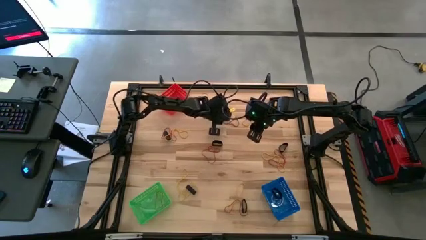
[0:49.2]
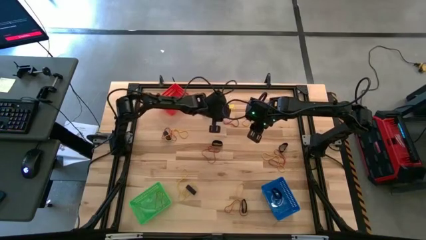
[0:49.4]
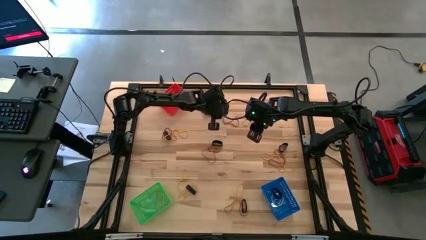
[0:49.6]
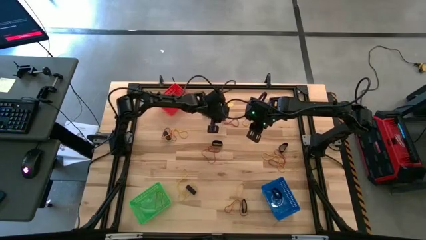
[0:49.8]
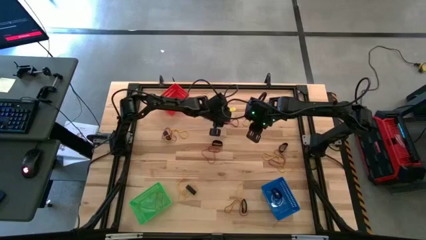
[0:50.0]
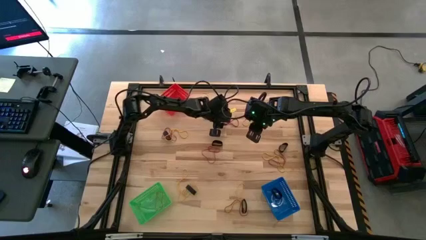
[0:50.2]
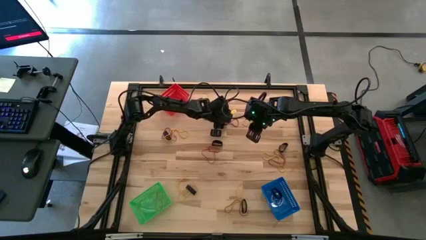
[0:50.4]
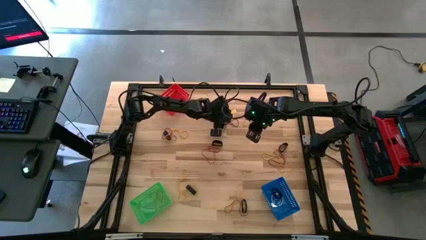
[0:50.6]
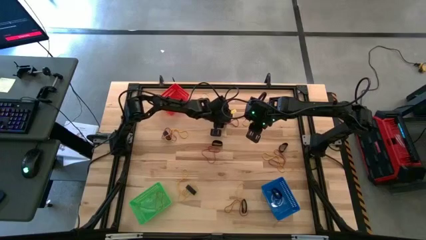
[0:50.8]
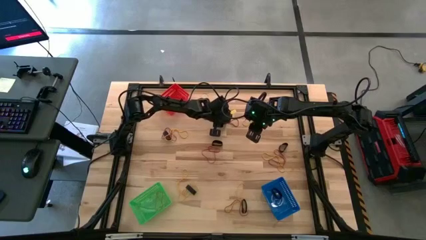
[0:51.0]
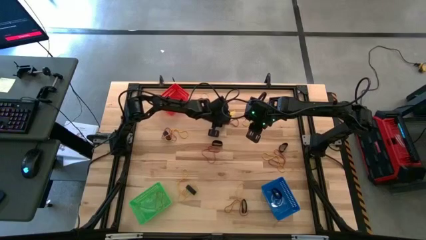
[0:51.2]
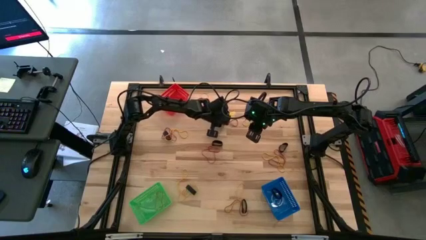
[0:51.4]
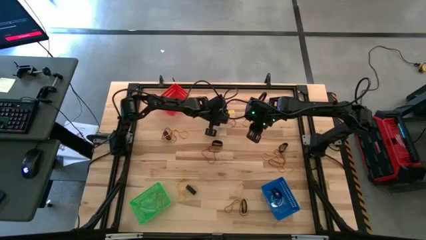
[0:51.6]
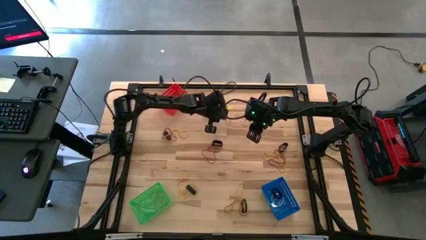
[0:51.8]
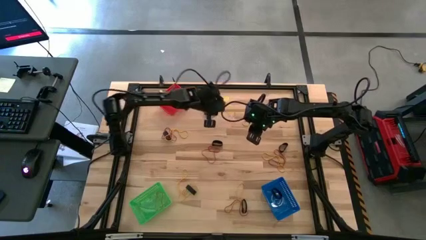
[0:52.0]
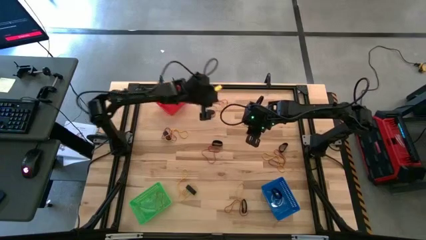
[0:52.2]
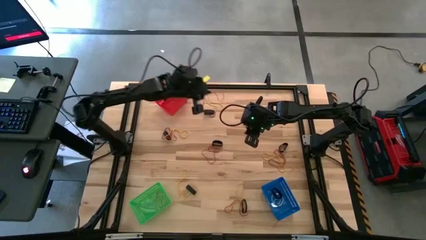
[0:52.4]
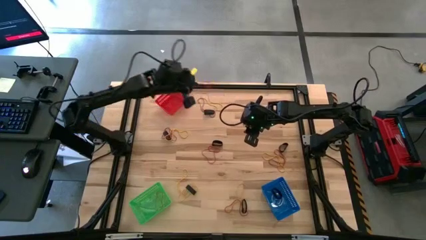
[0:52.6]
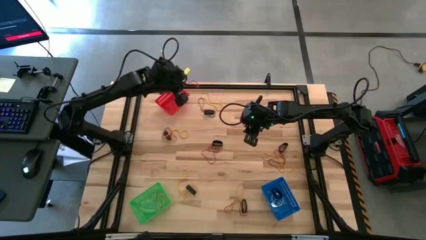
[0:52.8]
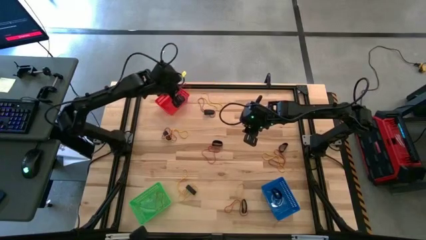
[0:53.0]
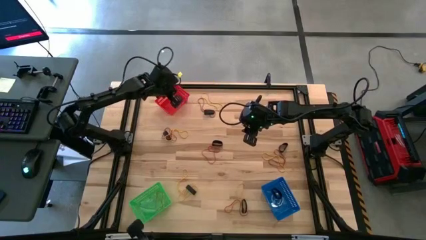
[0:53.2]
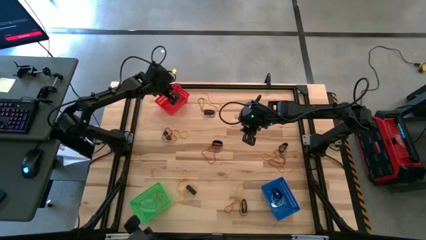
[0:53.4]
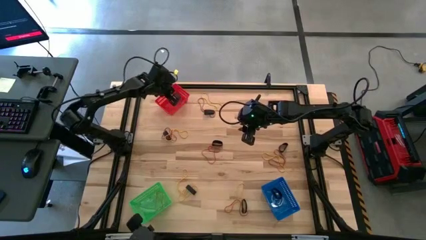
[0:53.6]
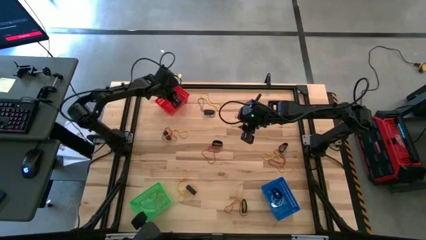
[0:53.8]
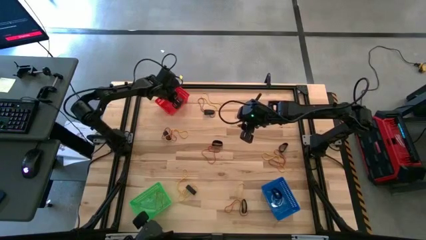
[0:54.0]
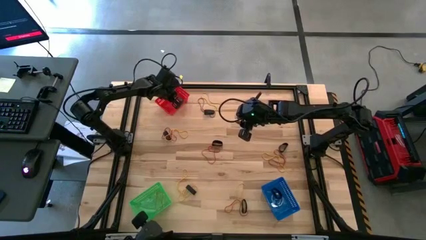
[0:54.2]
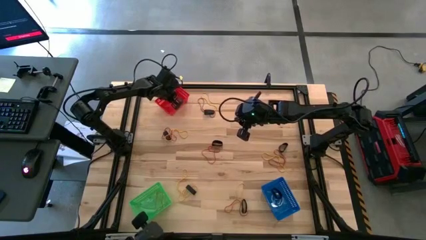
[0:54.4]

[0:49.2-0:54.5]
Task: Sort rubber bands into baskets
Put the red rubber band into the red basket

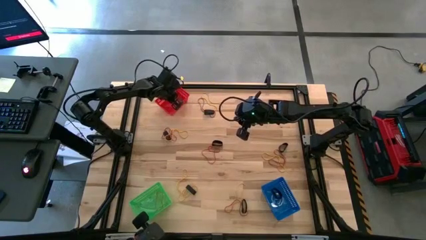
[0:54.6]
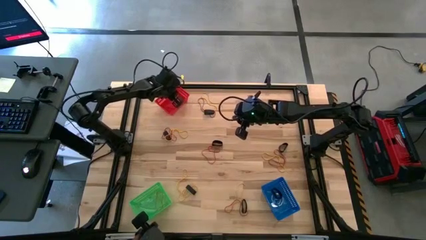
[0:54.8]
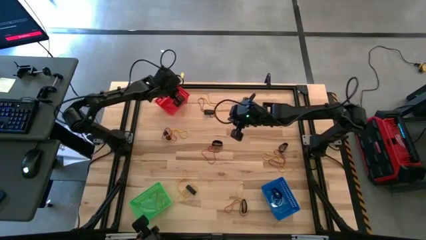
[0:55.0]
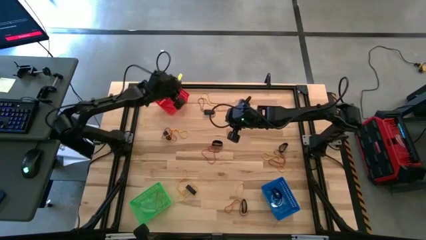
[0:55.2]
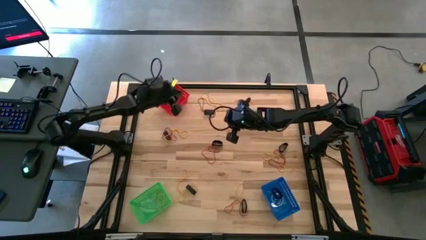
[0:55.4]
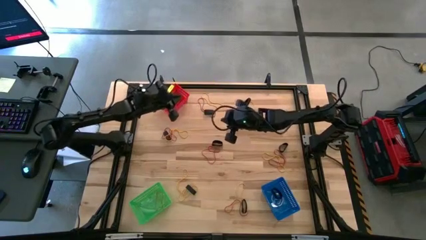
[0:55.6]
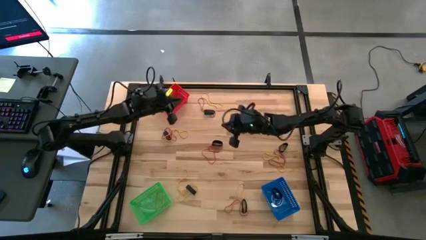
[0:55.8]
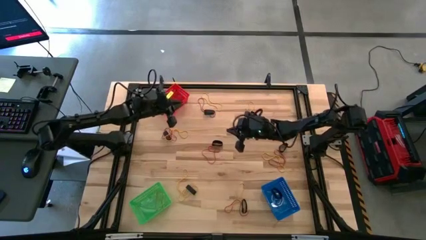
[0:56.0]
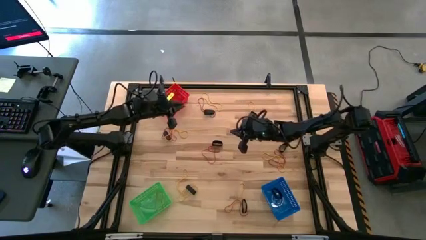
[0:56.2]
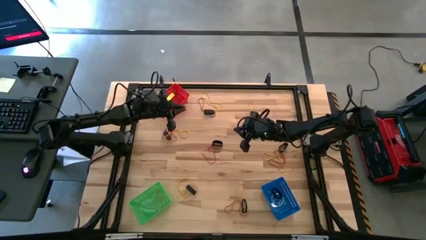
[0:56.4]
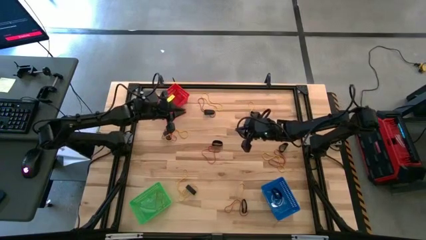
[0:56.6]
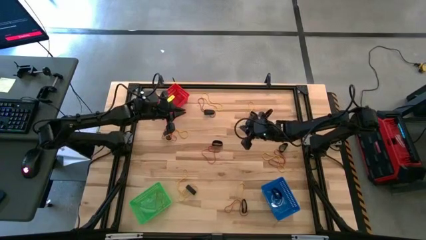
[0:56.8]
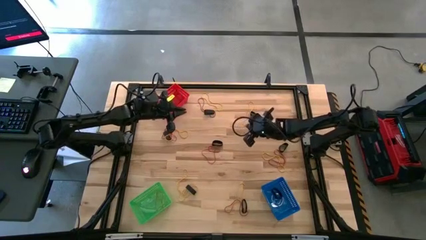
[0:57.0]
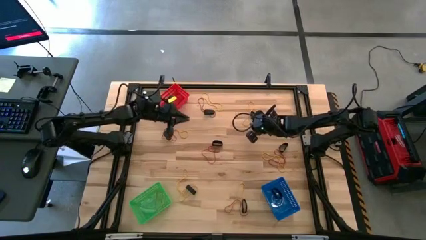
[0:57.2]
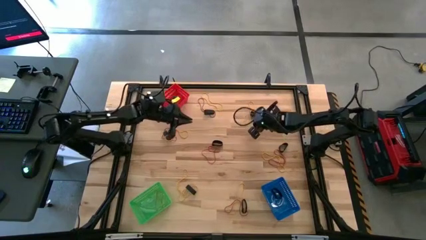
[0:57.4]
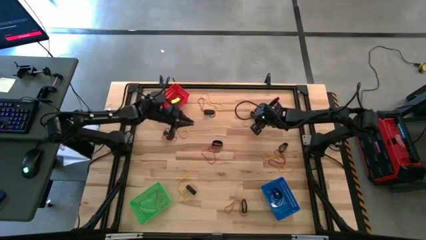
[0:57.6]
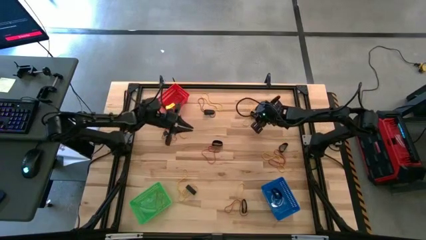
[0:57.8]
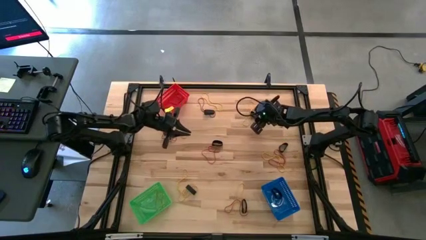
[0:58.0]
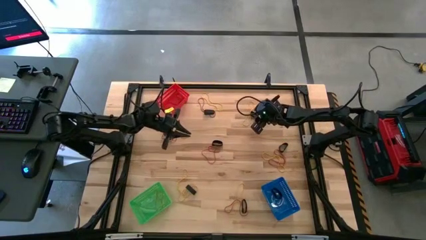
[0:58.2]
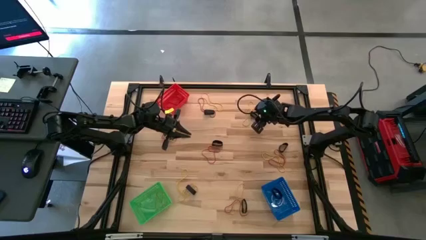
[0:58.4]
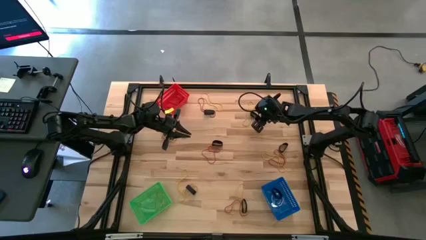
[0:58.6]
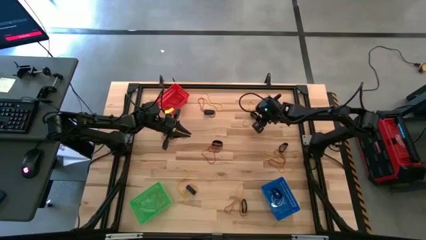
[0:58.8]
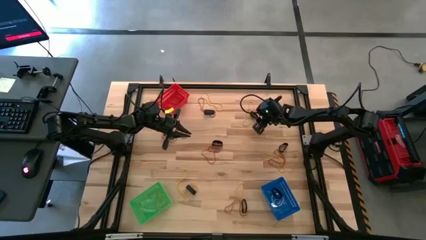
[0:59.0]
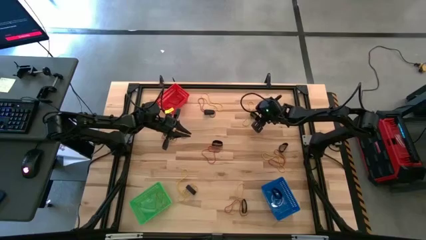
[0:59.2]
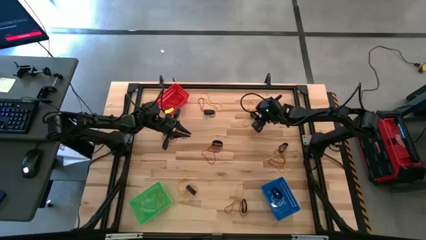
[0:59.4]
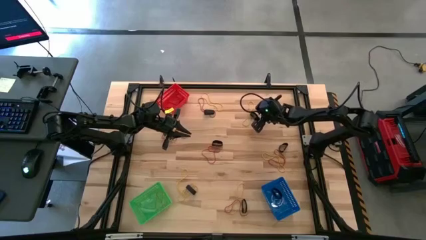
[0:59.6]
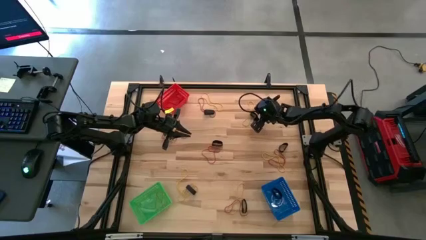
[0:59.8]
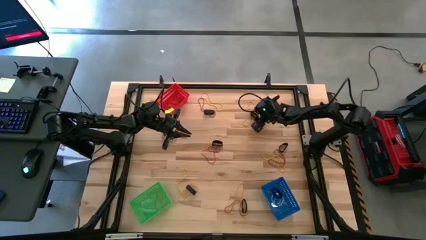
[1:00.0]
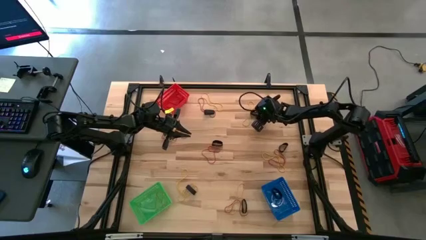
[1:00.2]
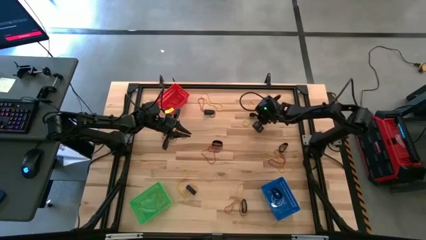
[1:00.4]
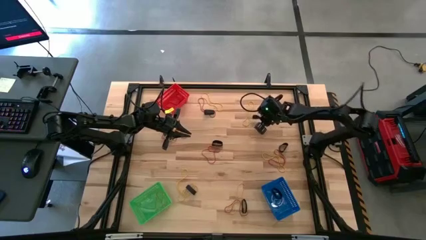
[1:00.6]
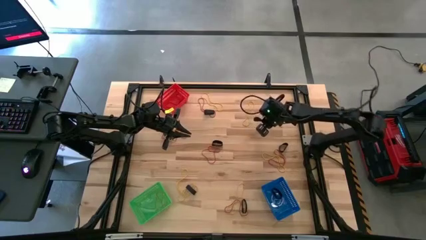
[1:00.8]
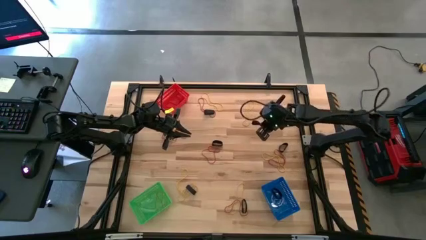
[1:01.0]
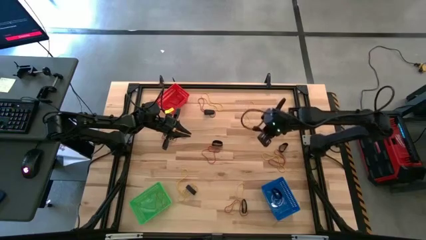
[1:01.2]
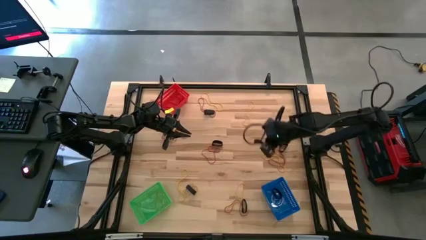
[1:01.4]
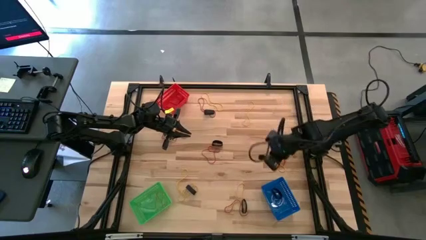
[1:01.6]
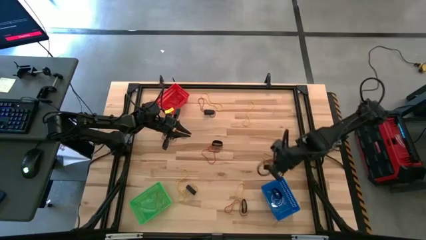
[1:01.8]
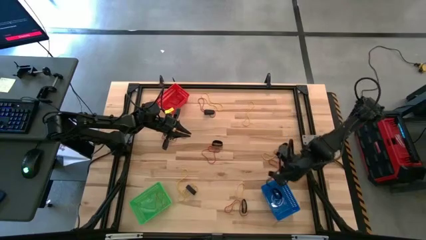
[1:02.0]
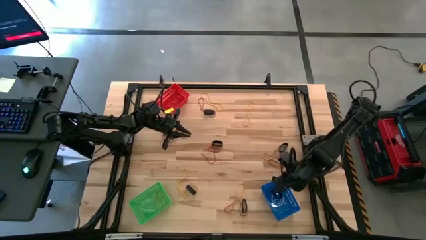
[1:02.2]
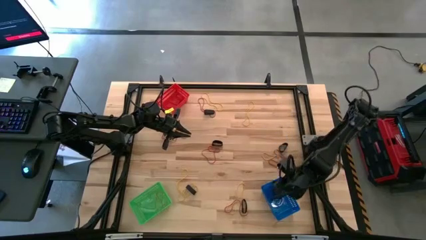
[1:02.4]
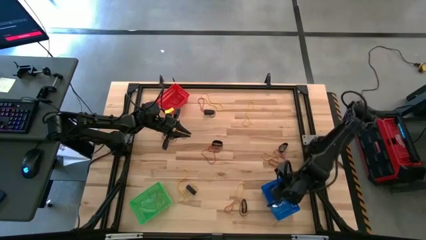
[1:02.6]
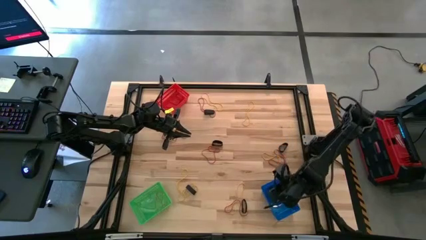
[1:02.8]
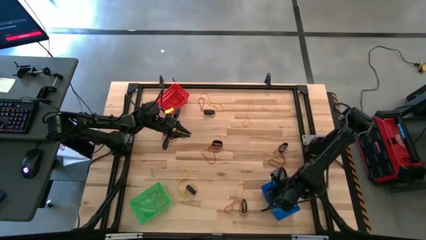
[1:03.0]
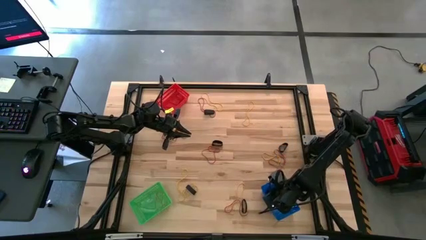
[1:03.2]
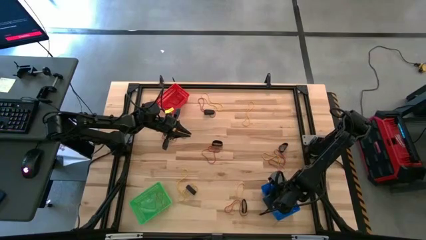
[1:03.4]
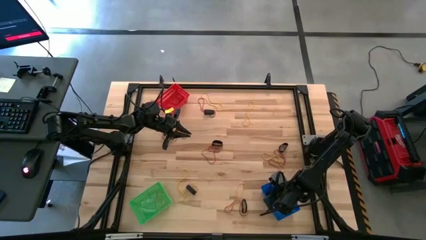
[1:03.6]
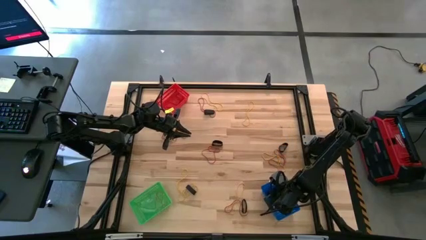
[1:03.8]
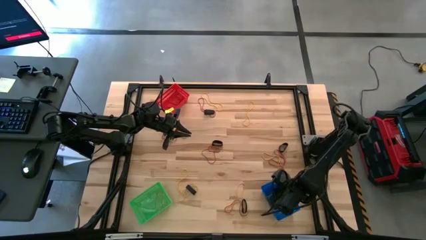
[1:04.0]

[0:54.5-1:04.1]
Put the black rubber band into the blue basket
